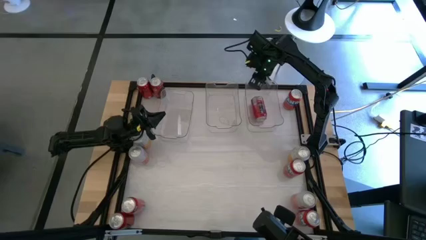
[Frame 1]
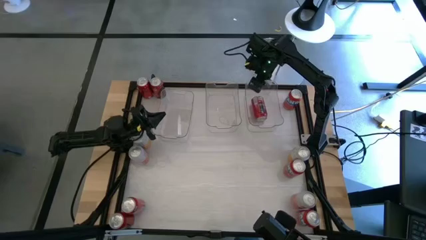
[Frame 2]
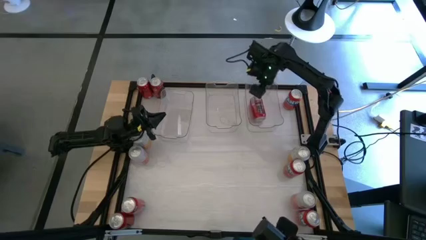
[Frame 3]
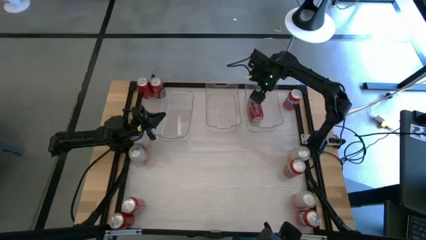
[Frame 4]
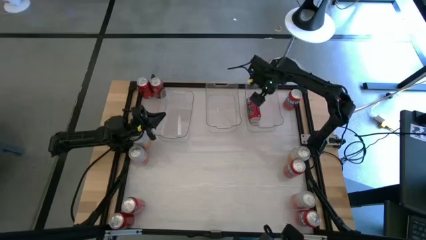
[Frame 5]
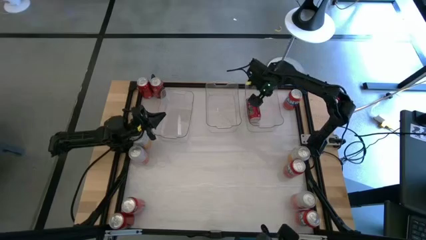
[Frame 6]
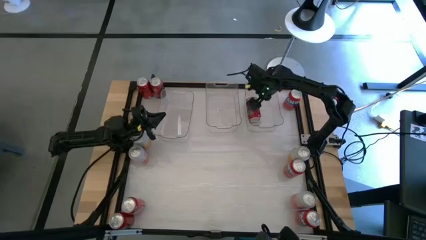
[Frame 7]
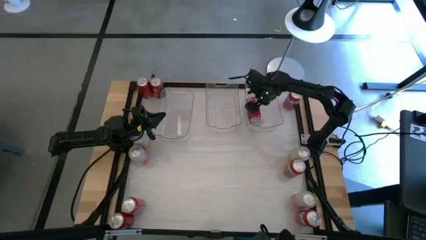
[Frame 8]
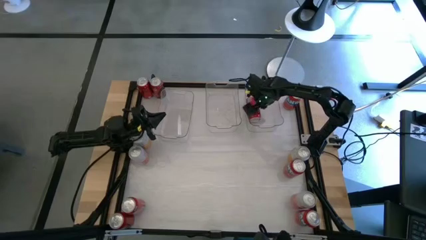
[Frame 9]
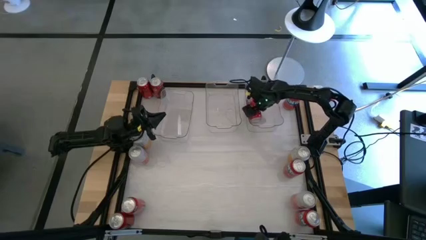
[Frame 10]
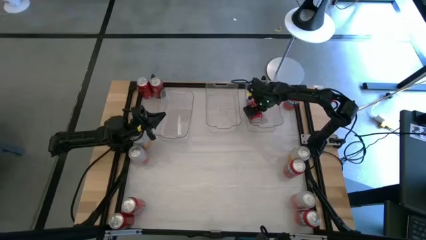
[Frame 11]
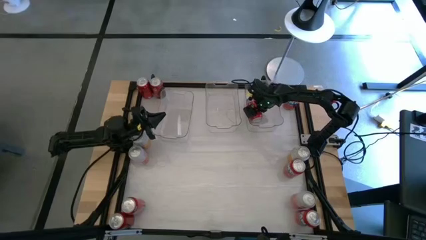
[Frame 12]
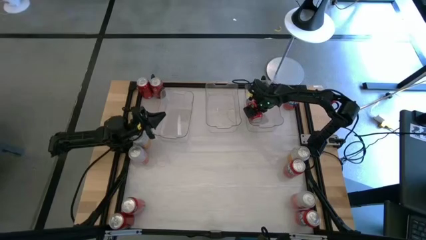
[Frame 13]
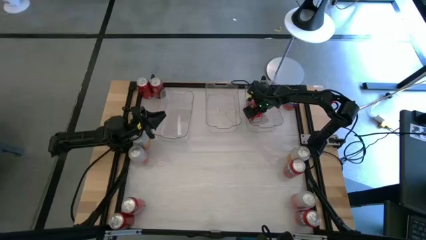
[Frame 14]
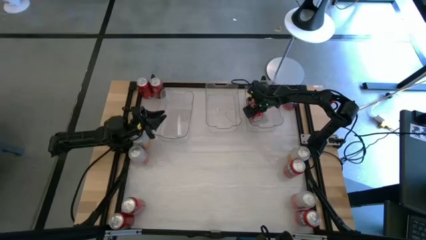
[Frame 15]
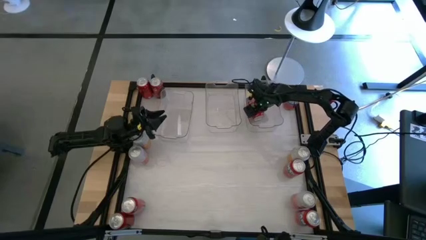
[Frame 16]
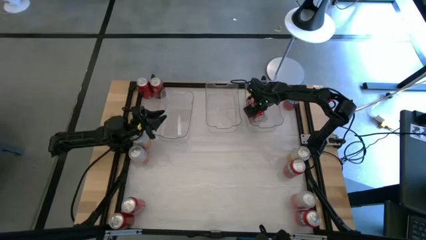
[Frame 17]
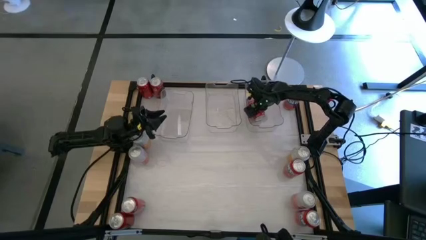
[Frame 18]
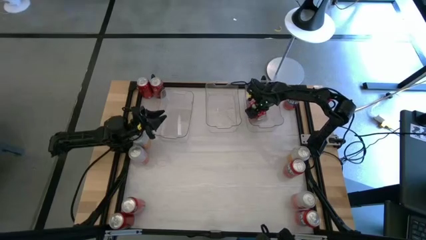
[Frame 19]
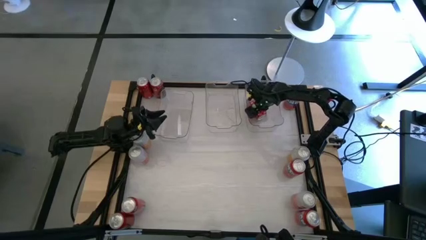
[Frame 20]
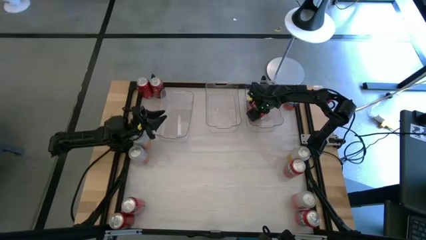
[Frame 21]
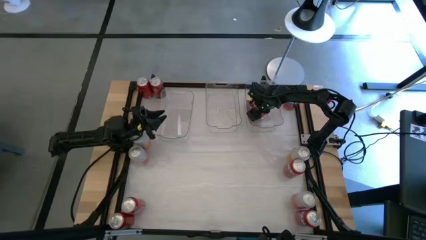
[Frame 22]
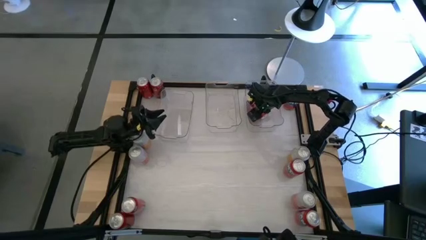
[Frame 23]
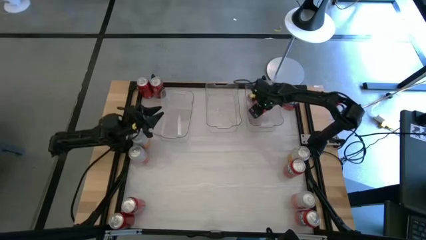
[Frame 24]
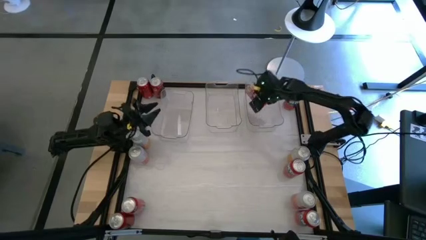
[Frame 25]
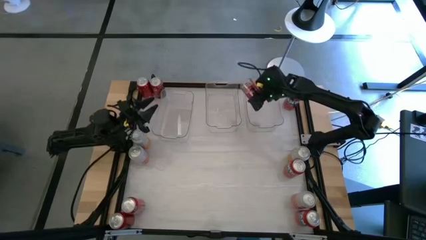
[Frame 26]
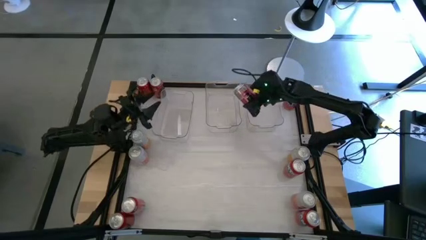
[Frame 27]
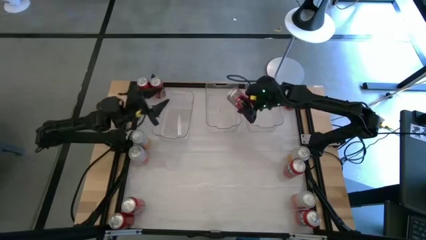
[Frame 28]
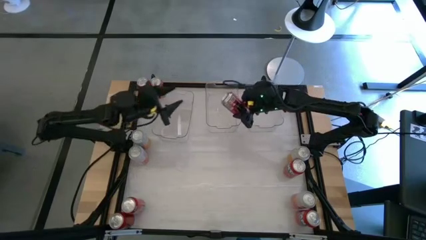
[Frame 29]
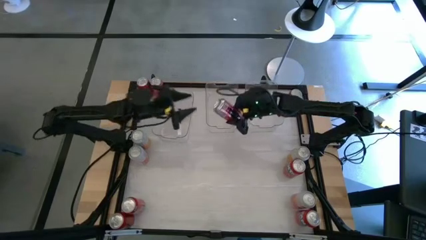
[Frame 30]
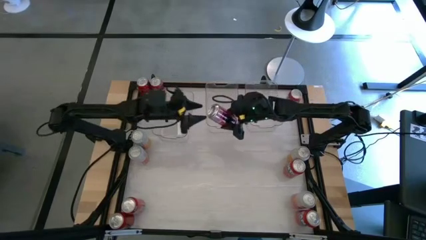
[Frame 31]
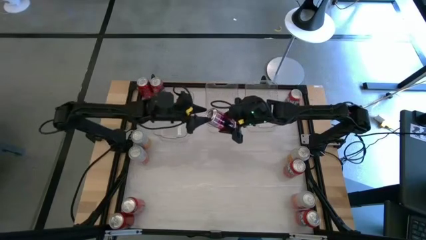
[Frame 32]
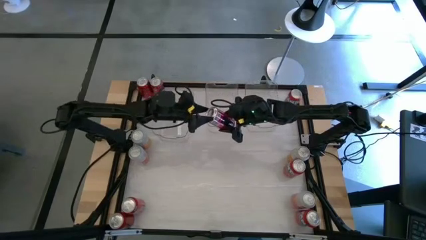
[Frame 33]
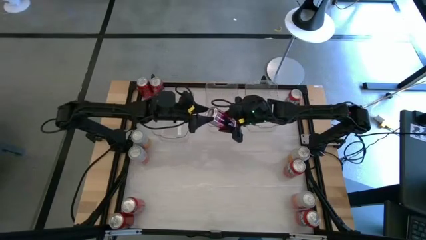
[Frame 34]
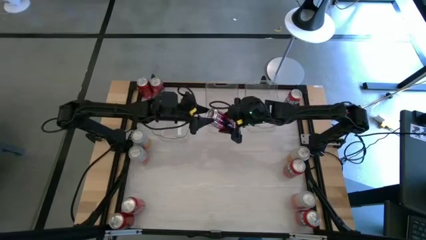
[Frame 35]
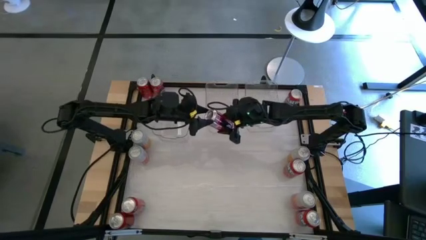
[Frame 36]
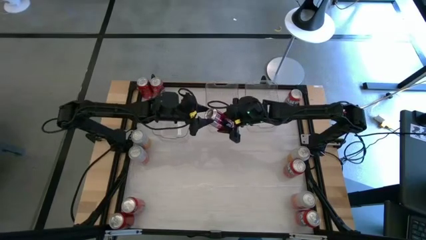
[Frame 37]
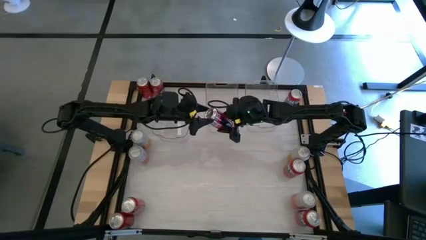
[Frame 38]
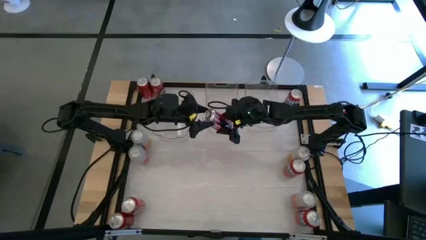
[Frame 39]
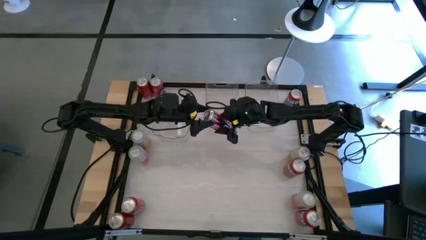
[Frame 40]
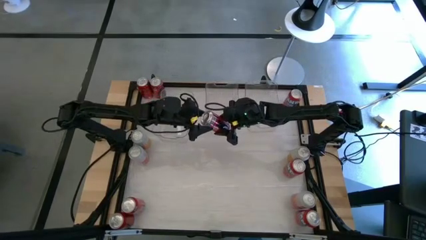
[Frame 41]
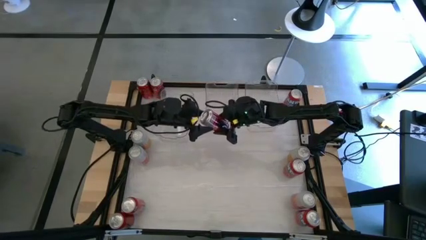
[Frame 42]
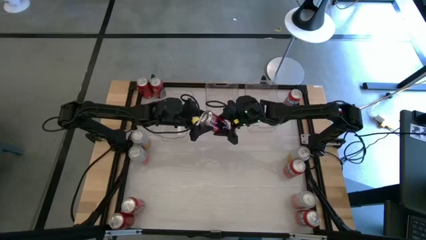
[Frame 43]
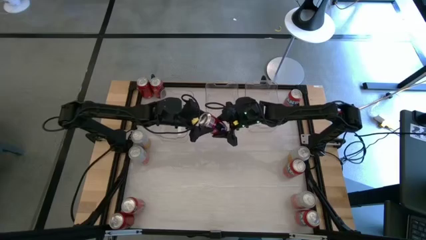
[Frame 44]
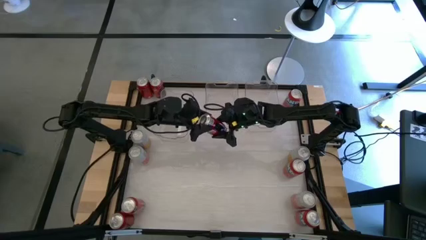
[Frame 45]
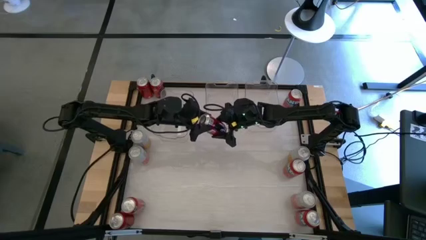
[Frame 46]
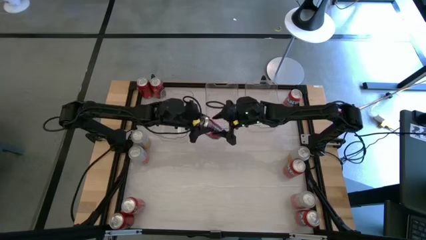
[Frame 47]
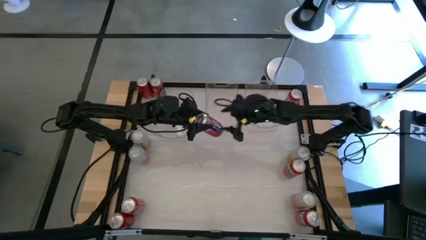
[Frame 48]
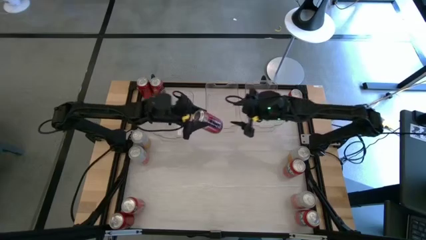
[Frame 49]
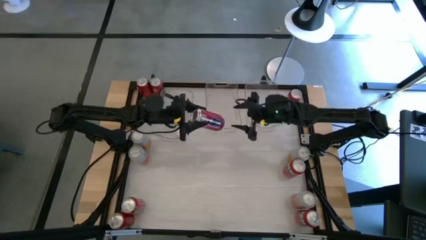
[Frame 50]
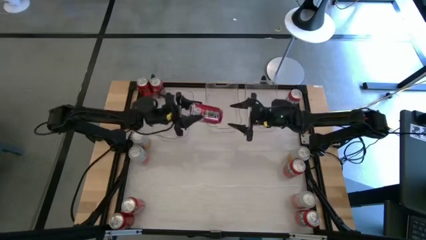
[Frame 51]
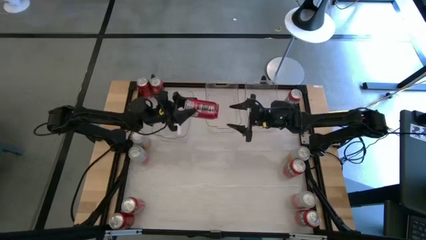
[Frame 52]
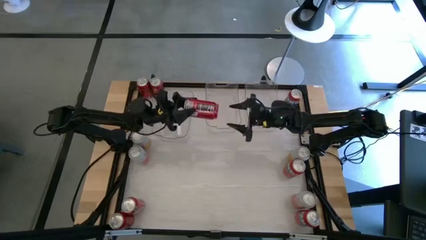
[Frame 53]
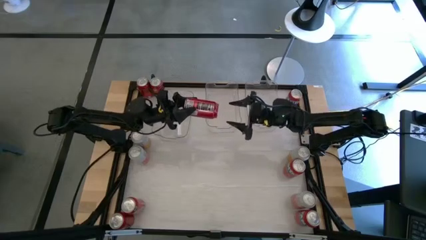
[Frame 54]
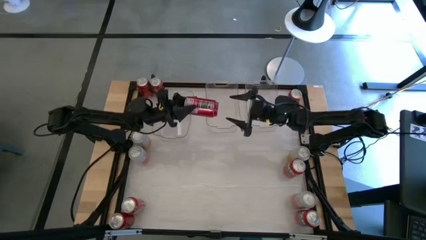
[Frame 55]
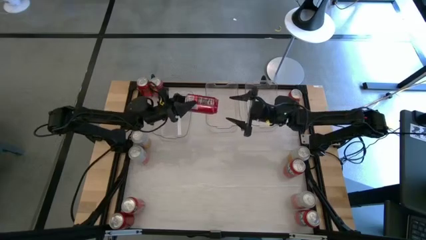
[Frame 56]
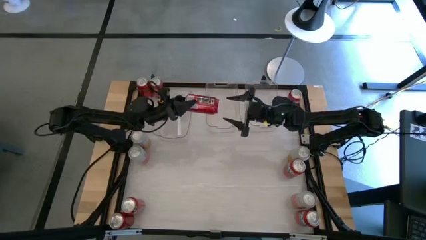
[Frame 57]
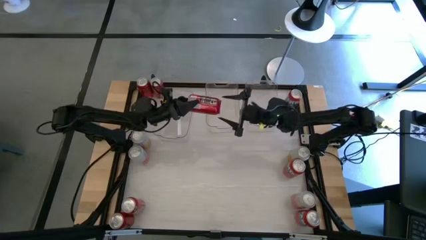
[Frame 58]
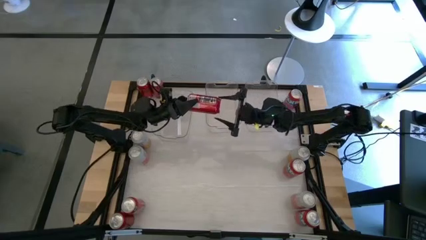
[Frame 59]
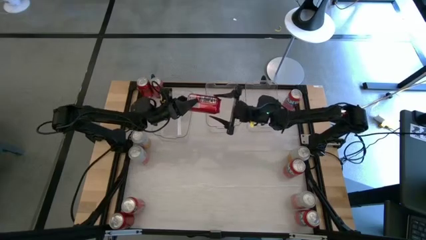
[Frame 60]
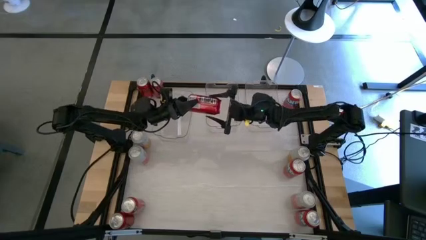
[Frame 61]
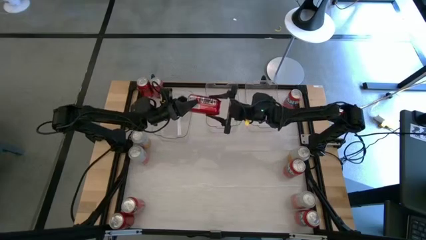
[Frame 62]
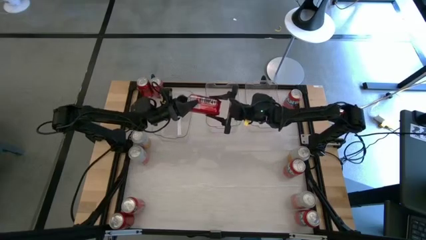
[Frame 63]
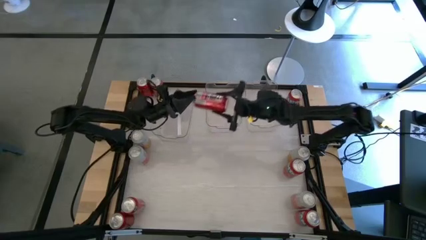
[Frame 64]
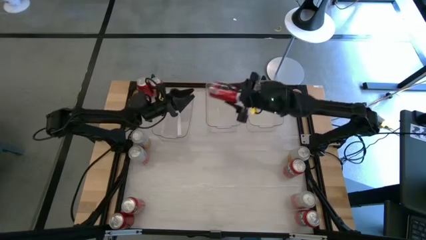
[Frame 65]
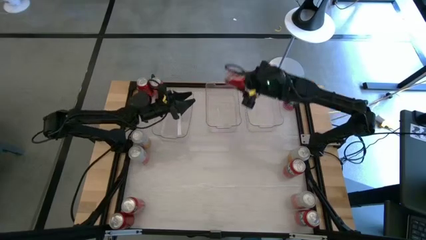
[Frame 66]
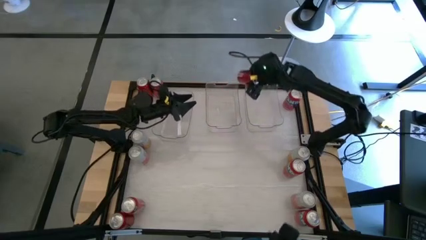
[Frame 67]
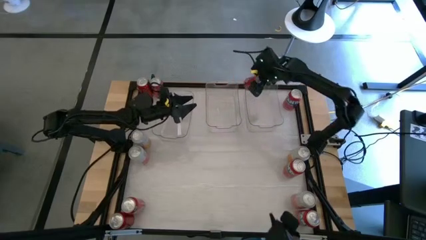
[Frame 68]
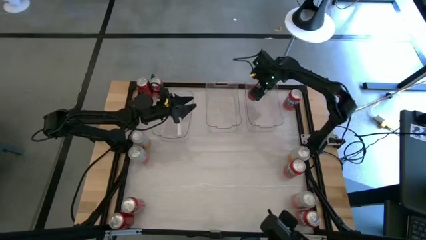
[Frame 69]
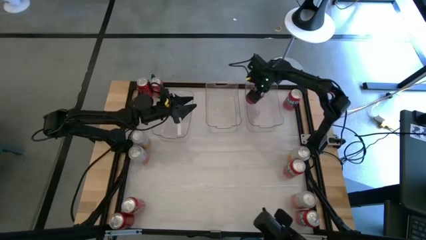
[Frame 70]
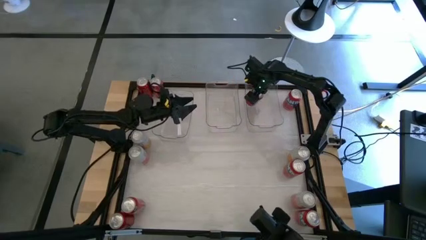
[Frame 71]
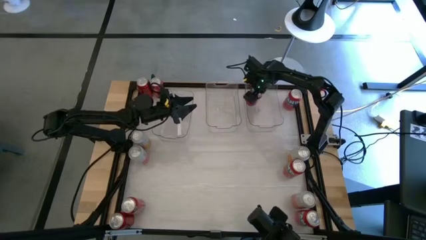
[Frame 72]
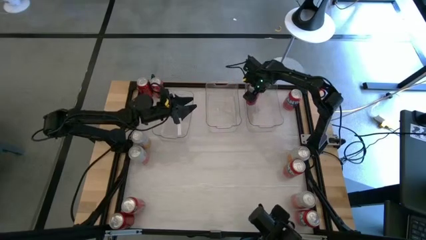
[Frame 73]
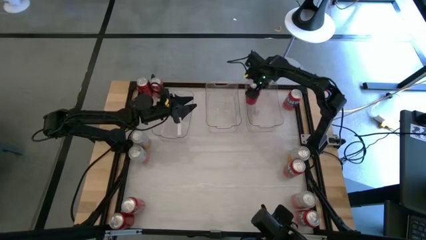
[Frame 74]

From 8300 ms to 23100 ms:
Task: Sort soda cans
Adjust the red black soda can in the right transparent bin

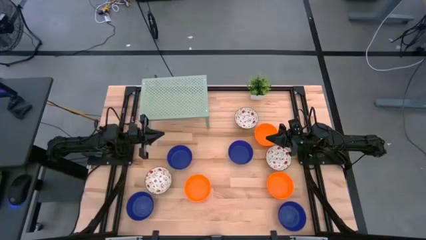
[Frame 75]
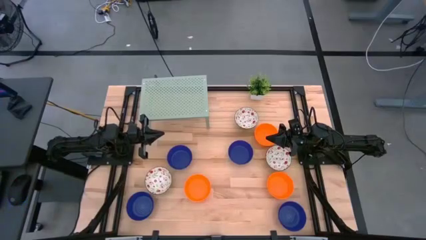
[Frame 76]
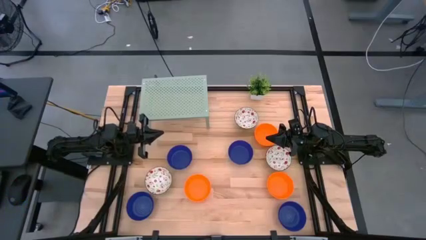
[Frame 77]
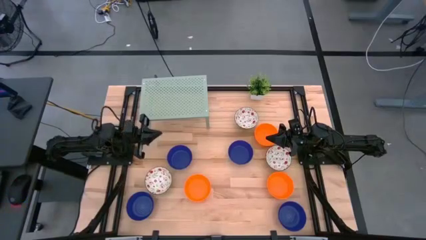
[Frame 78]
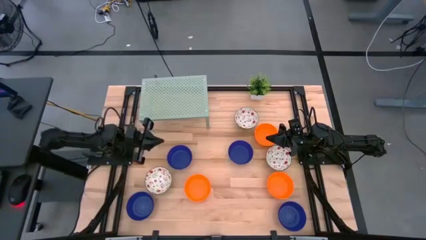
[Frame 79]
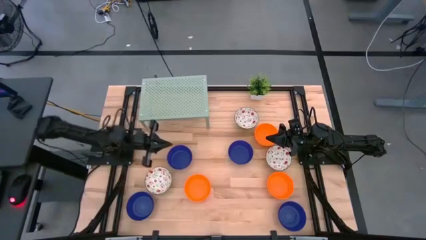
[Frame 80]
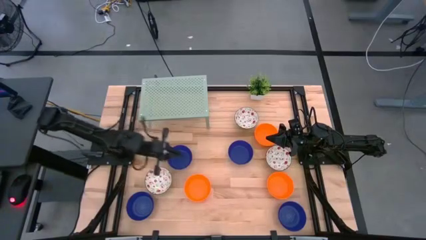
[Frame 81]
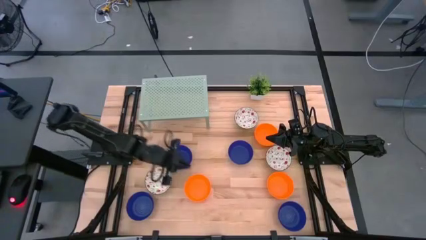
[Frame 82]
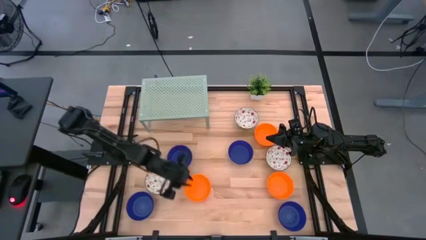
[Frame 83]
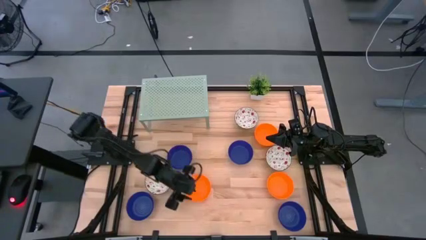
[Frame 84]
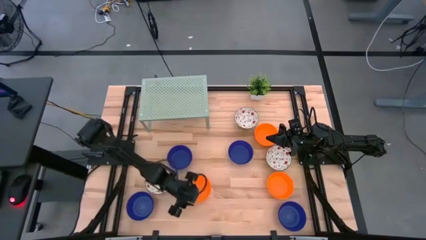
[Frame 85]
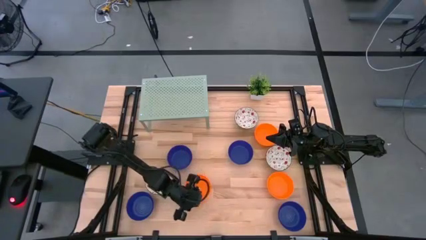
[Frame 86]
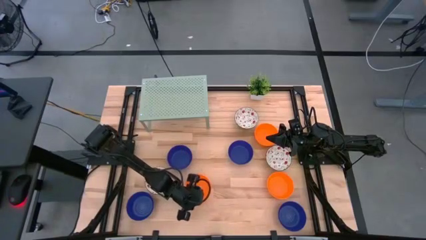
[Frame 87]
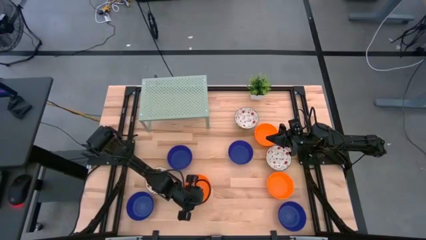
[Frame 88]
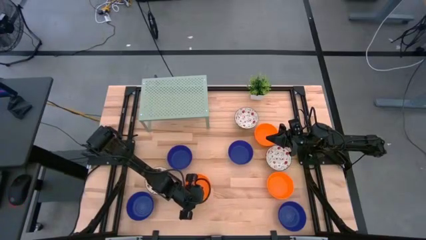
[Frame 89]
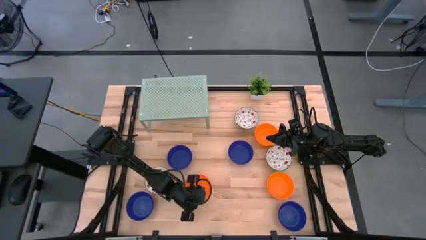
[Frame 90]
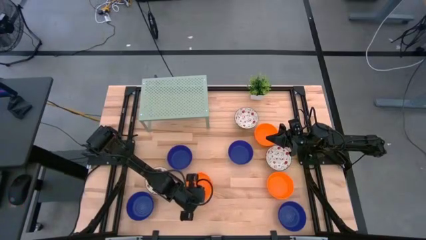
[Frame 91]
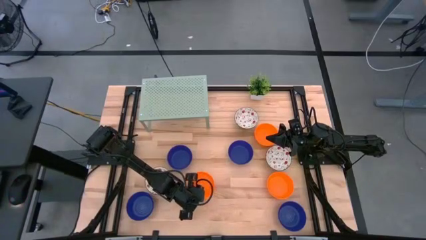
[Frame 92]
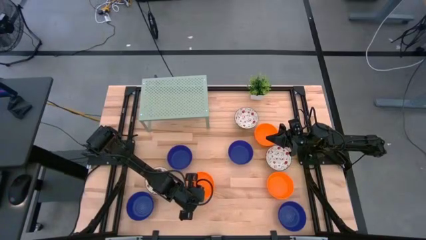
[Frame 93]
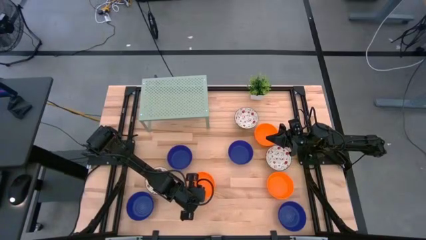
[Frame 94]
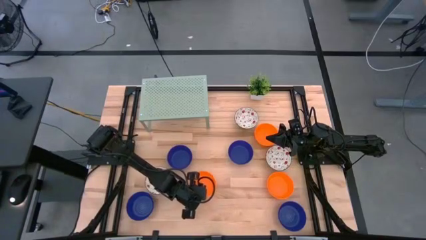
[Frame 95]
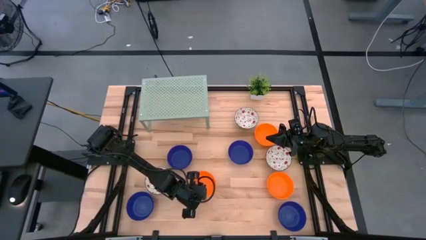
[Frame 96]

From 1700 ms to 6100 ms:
Task: Pick & Place Mini bowls
Put the orange bowl on the shelf
